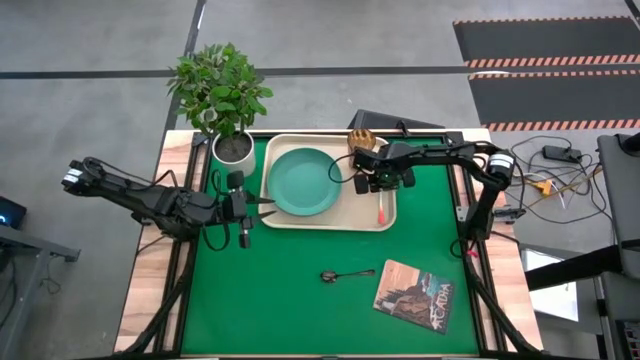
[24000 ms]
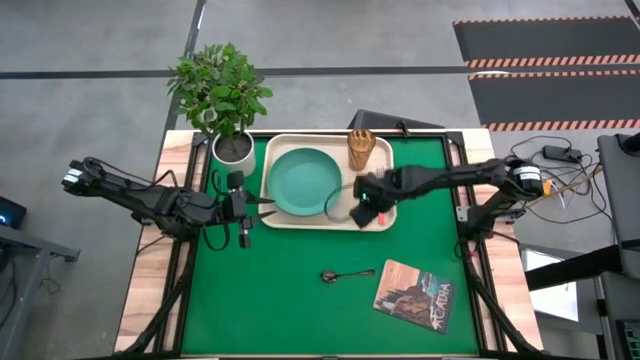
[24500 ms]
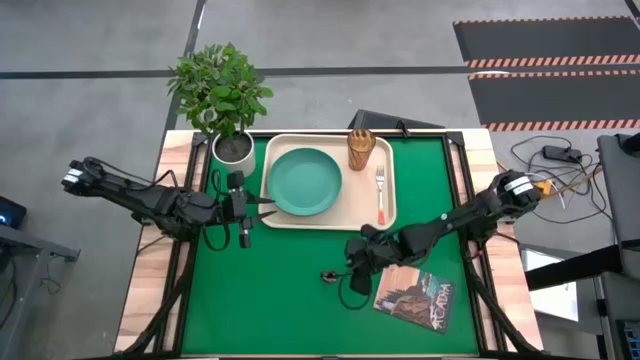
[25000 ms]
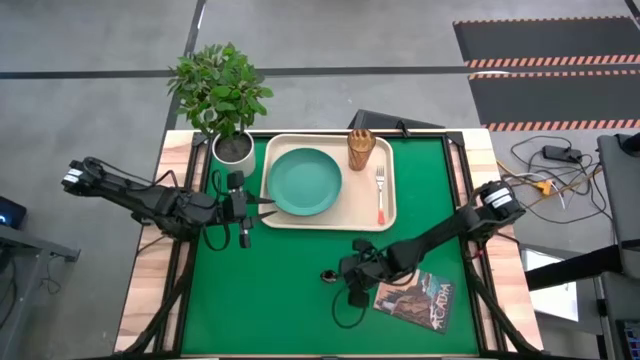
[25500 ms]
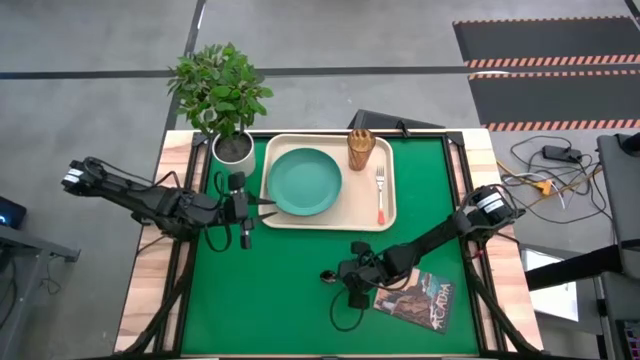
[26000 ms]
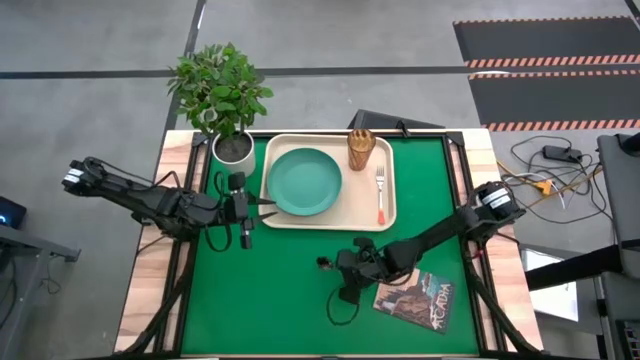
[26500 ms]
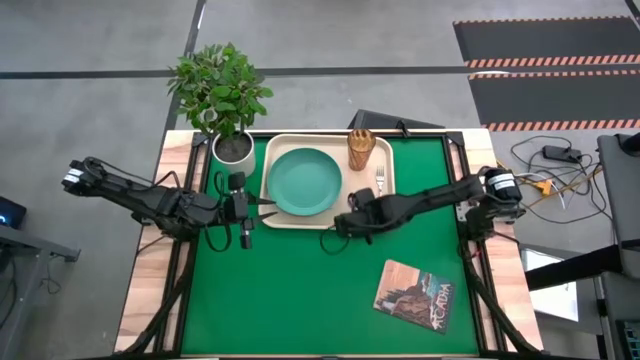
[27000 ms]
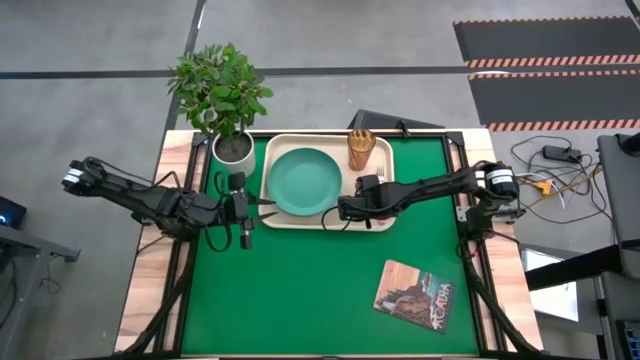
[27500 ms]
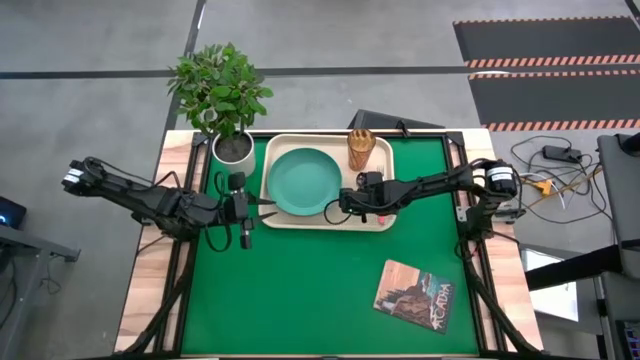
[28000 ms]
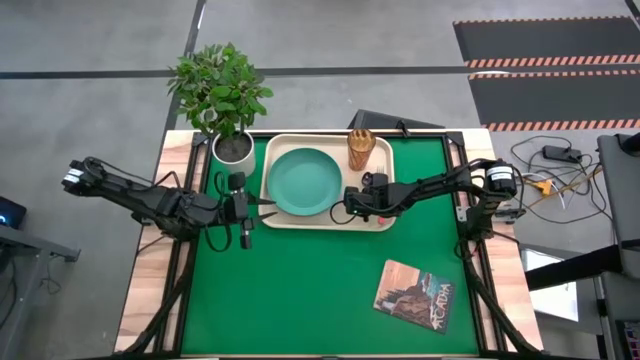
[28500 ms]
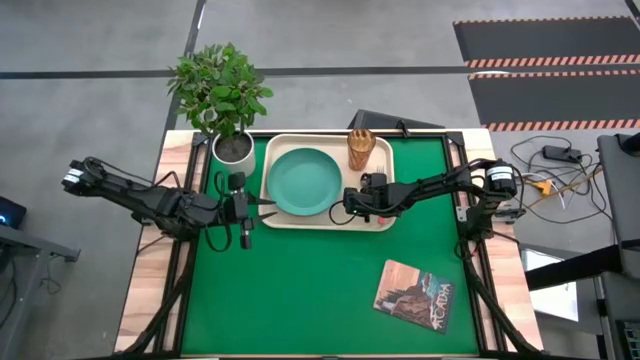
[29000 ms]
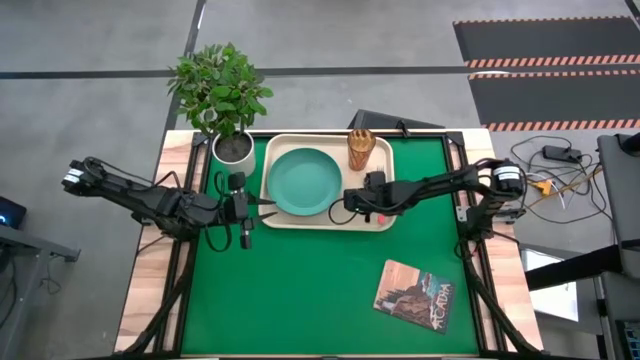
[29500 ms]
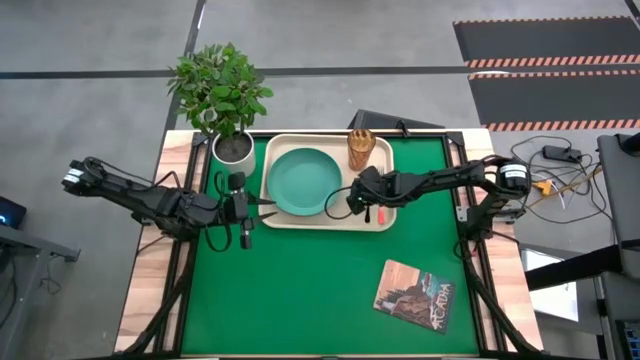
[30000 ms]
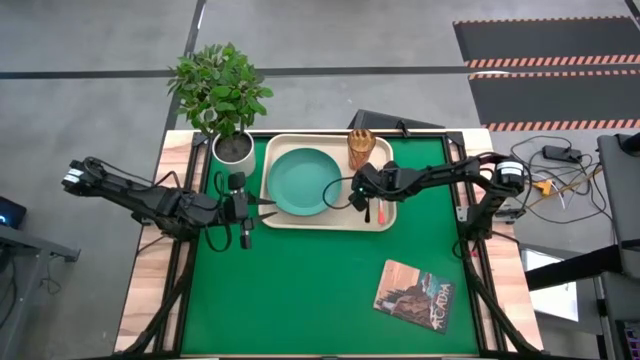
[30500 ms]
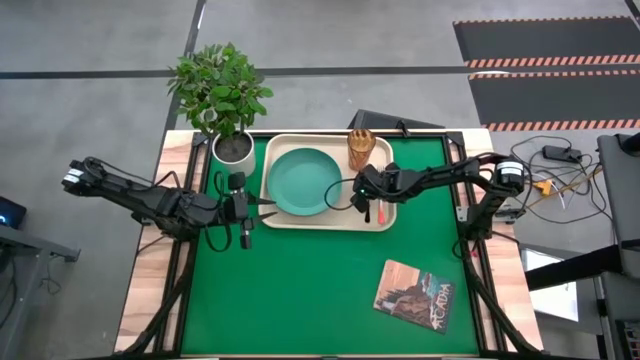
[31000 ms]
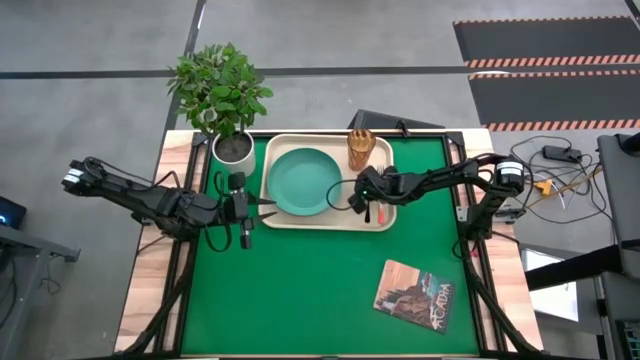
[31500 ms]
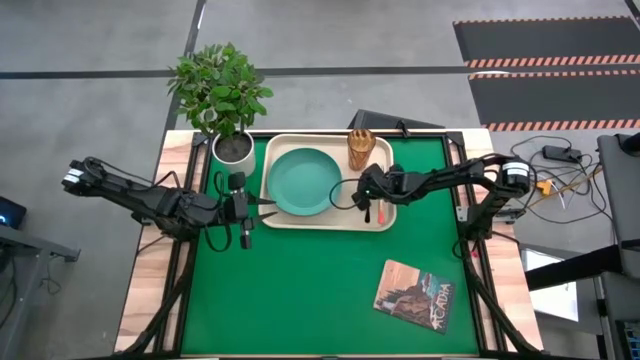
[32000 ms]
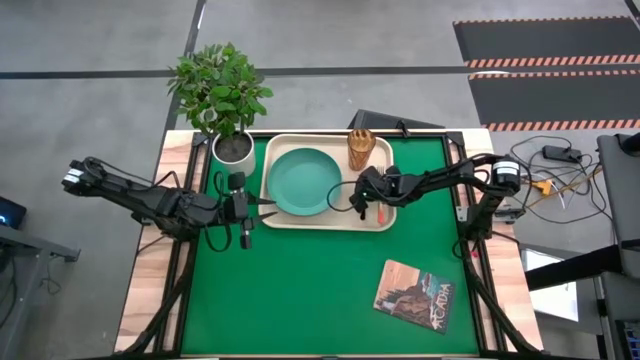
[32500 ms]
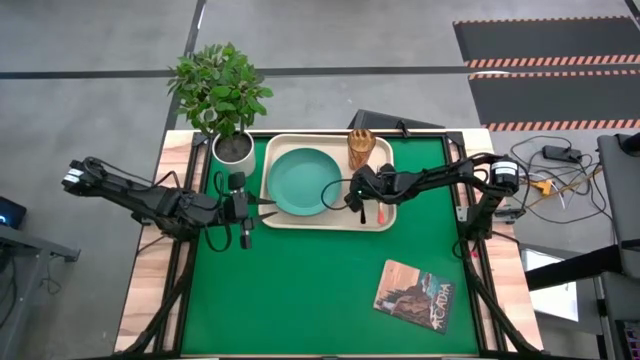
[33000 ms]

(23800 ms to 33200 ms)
Task: Pick and place plate/cup/fork/spoon on tray
Put the spoon in the middle of the brown fork and the green plate on the white tray

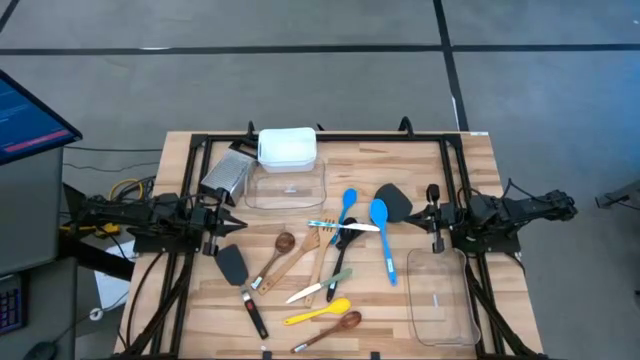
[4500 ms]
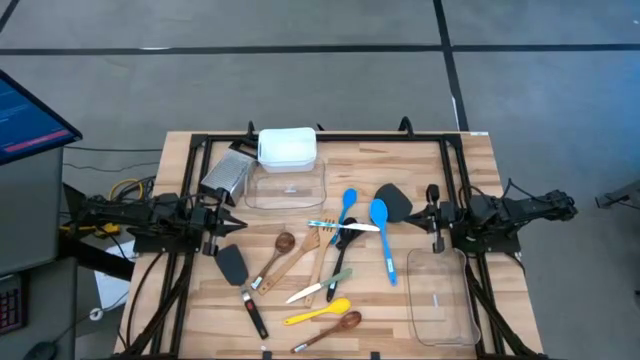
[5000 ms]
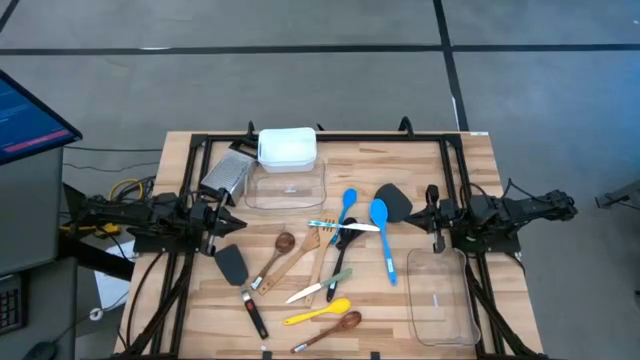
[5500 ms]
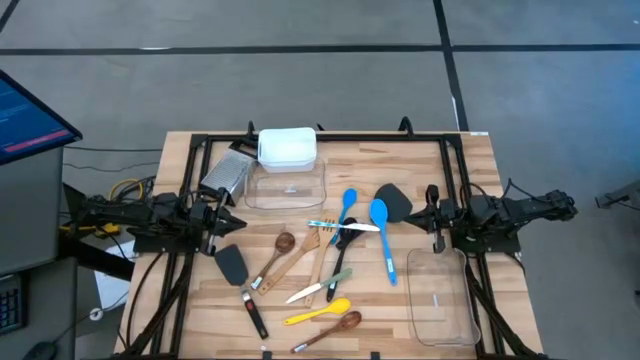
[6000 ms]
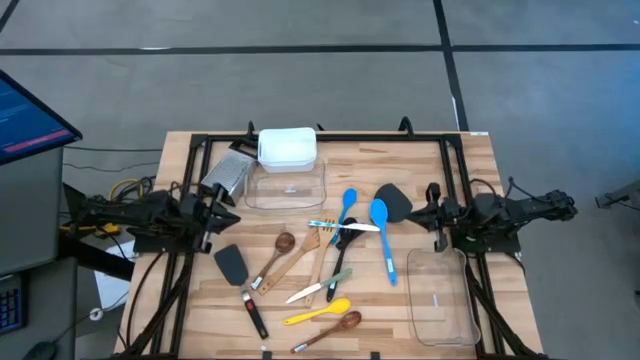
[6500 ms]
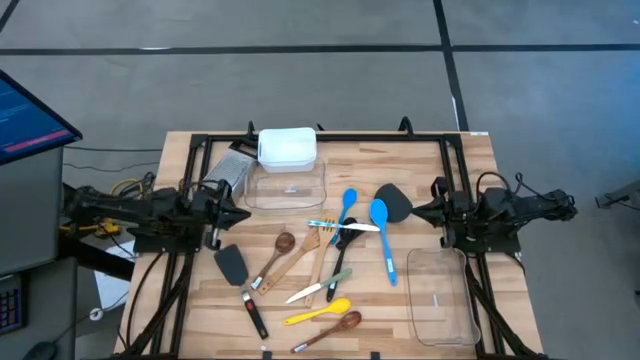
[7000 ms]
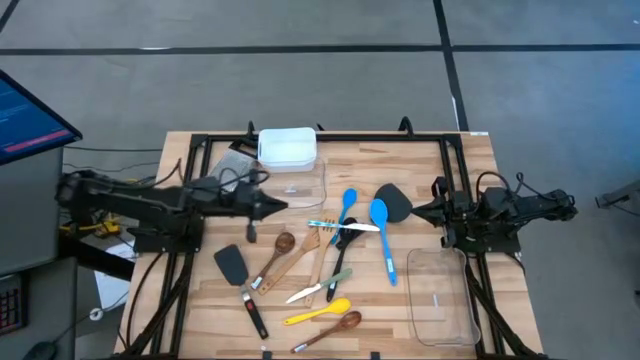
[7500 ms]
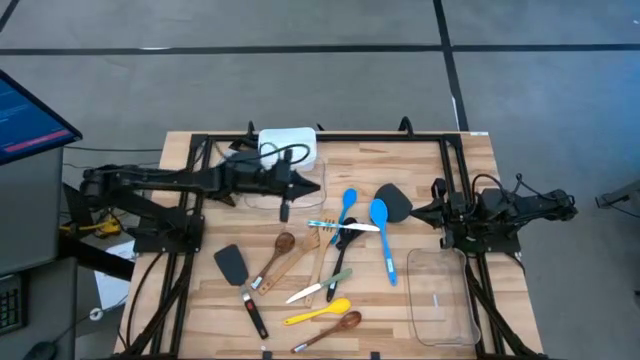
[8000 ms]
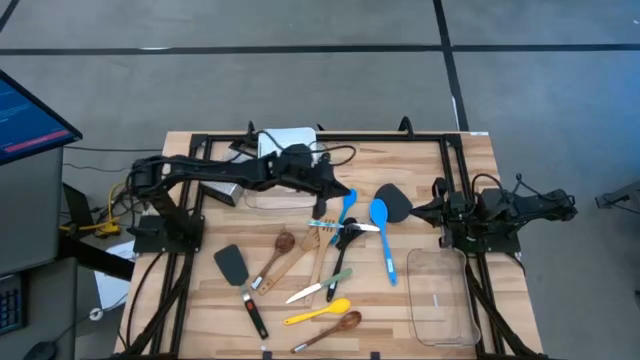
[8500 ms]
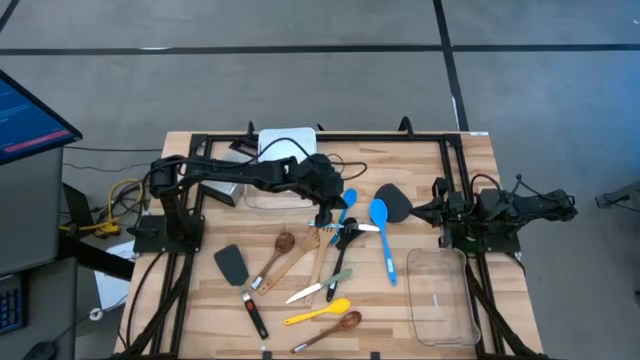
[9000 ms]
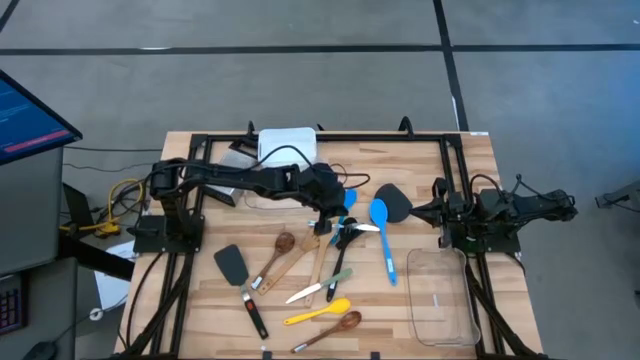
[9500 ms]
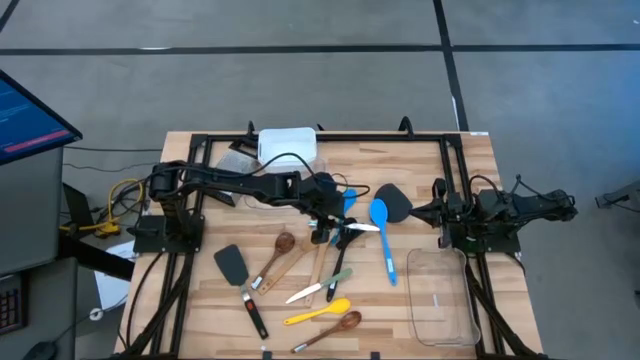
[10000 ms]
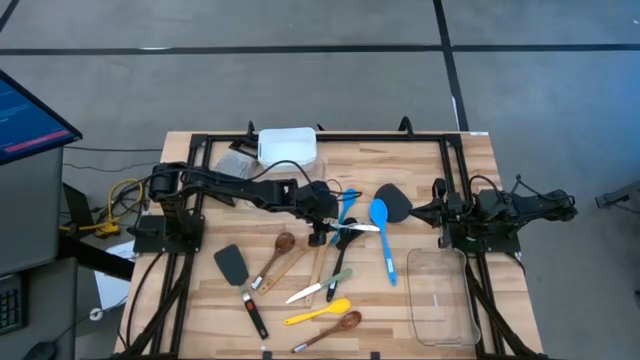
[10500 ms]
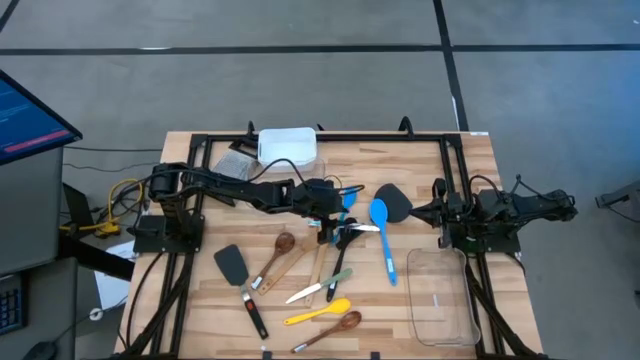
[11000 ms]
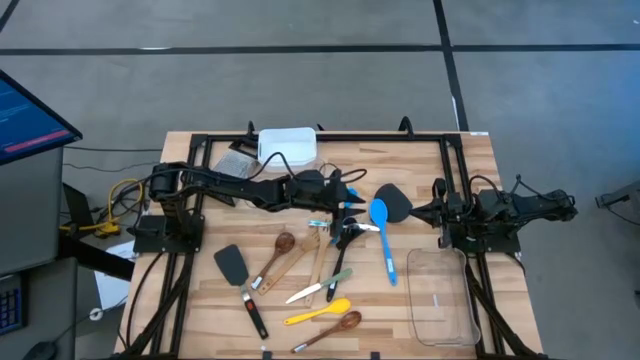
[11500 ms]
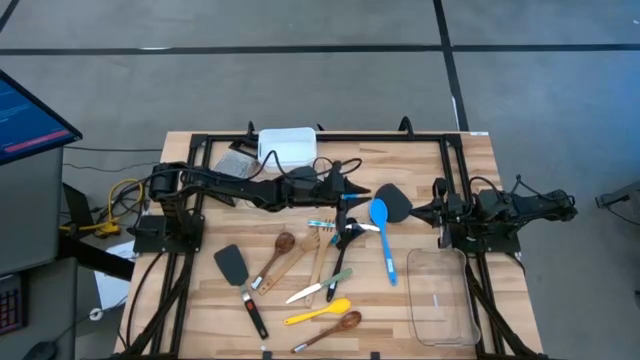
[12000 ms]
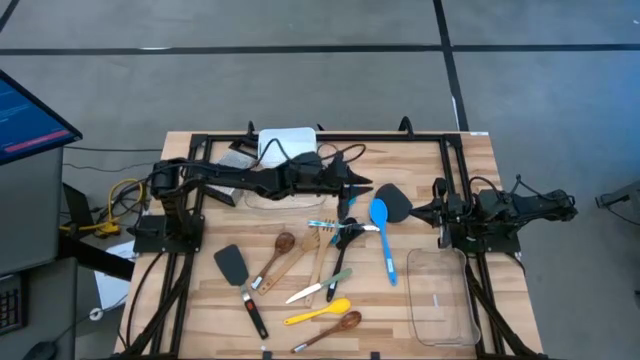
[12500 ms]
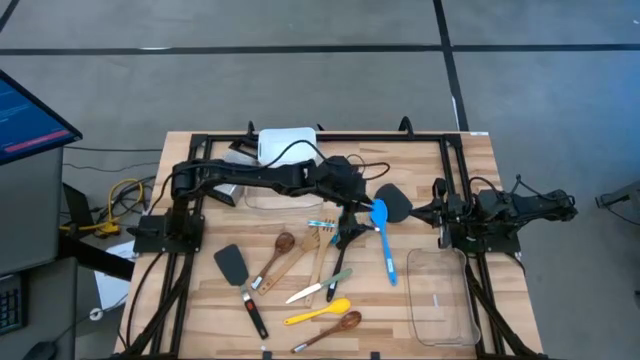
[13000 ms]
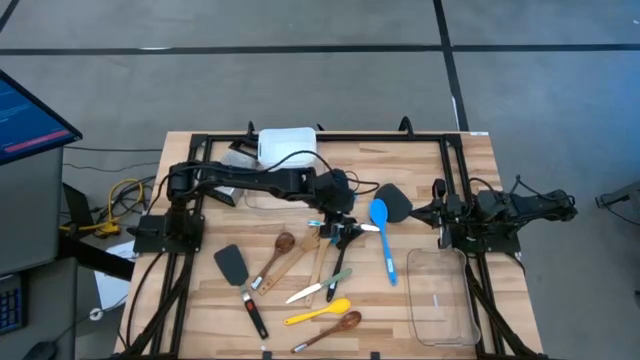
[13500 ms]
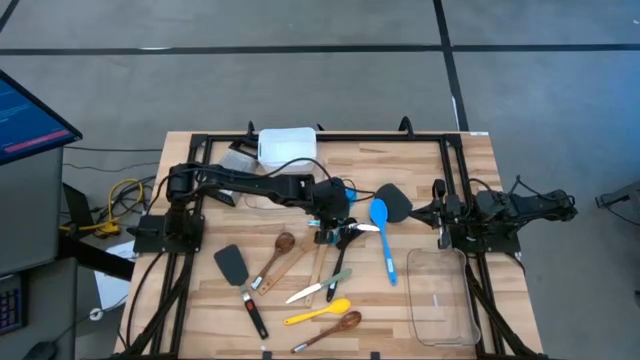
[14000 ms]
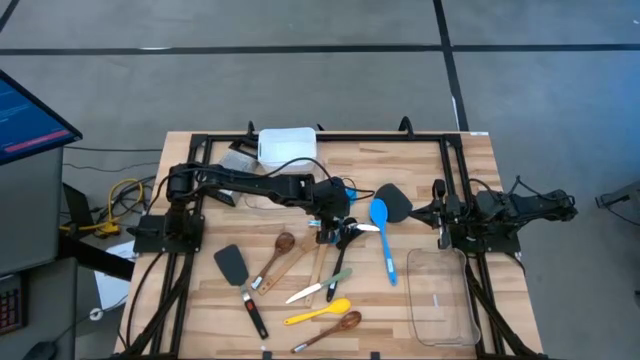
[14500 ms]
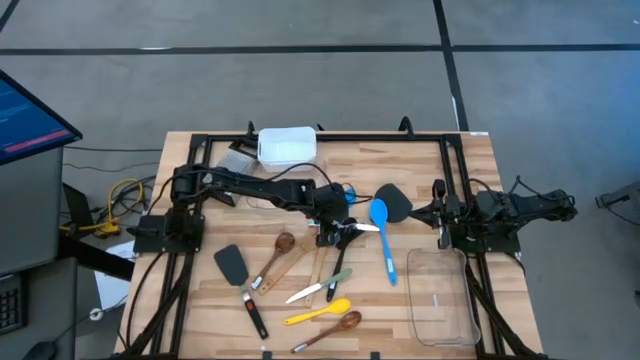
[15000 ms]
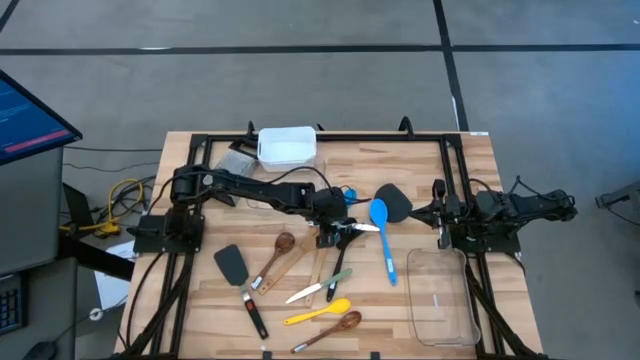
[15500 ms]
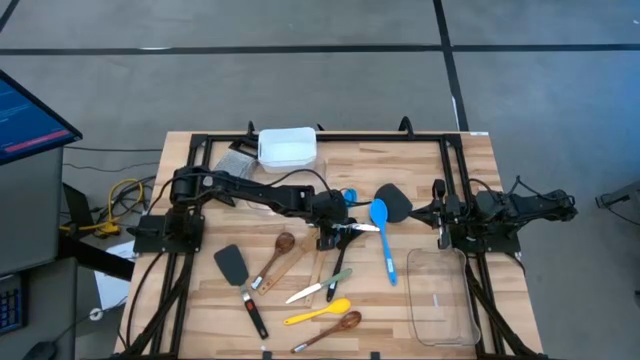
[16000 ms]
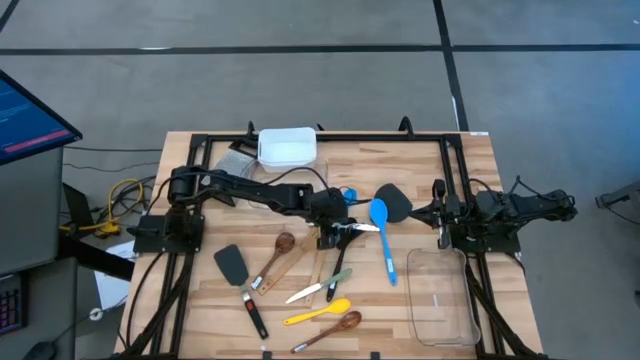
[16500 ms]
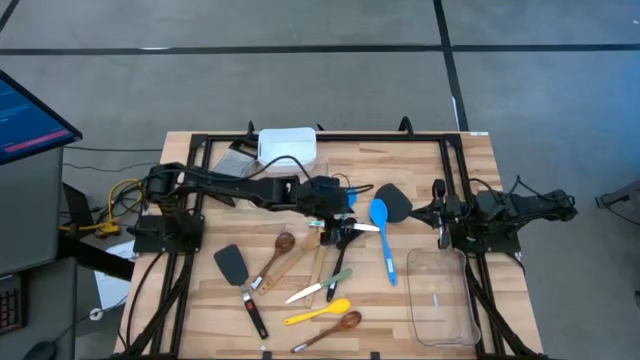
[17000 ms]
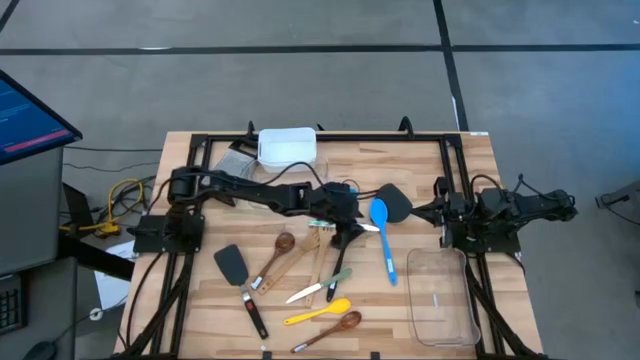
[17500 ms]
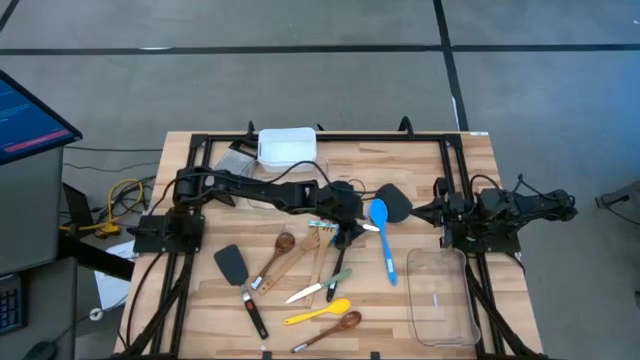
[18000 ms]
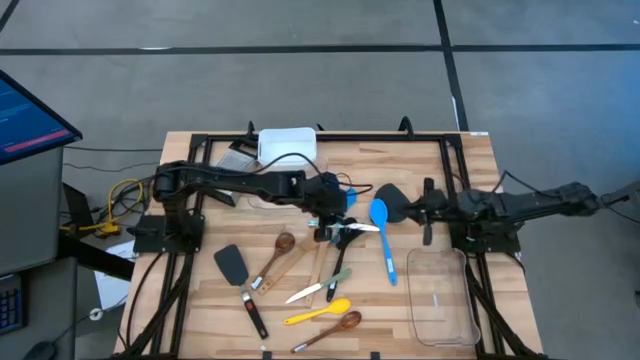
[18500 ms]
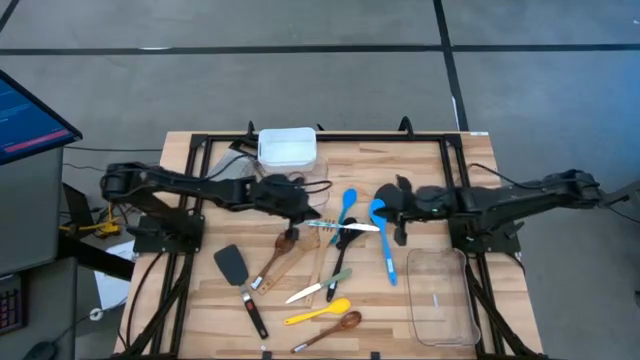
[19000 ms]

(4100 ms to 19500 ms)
Task: Pick & Place Kitchen Items
Put the blue patterned table knife into the white bin
